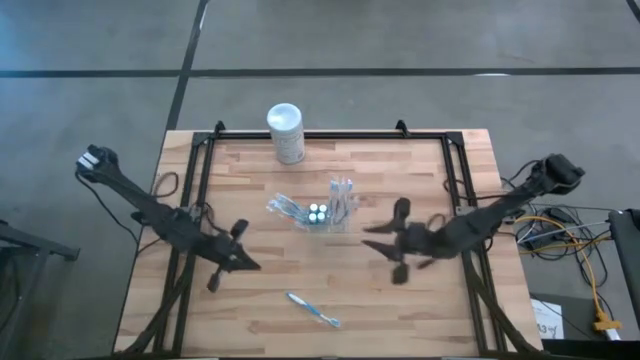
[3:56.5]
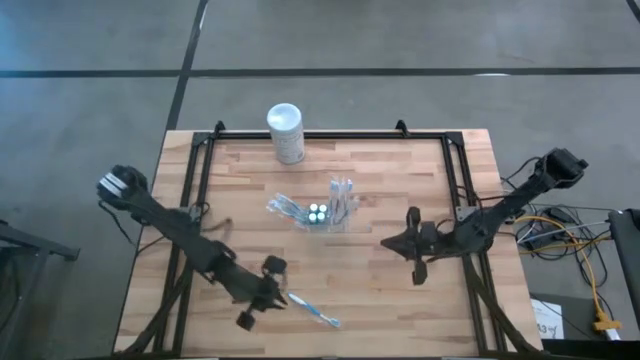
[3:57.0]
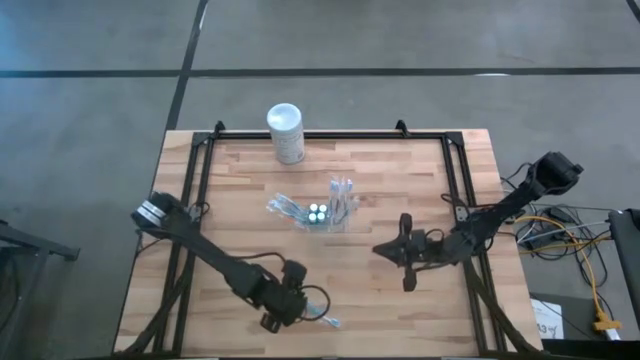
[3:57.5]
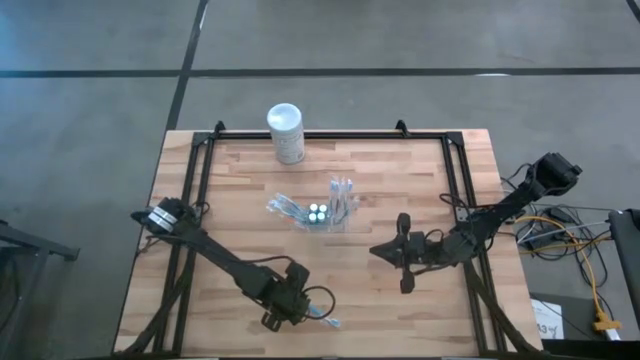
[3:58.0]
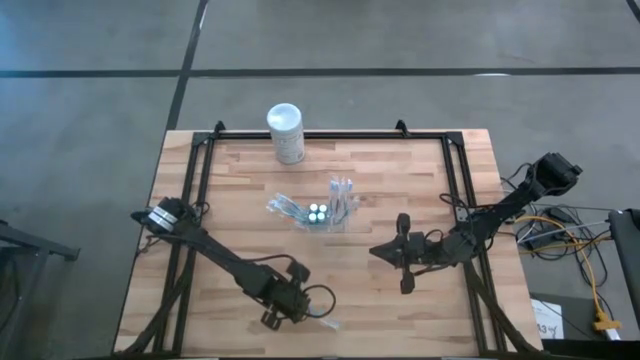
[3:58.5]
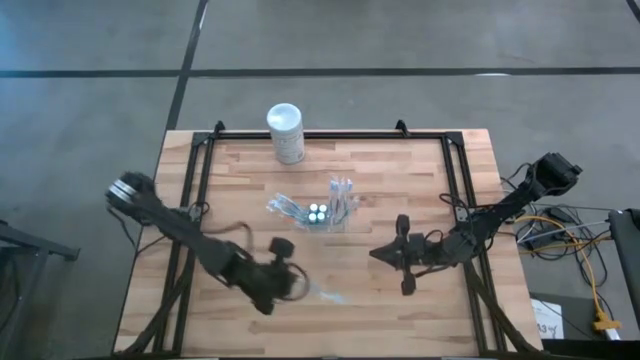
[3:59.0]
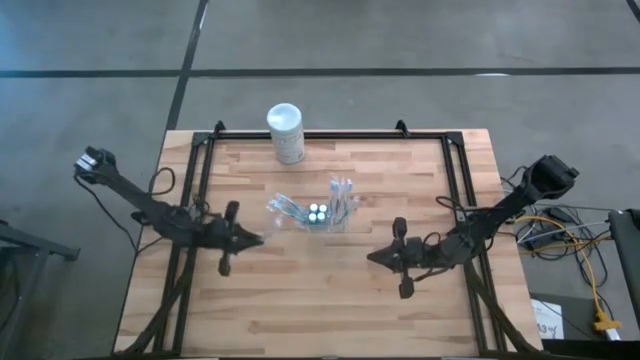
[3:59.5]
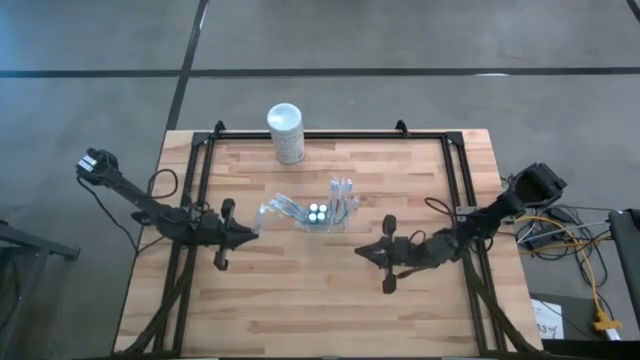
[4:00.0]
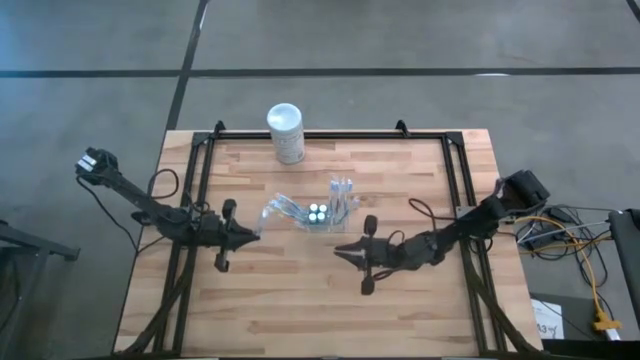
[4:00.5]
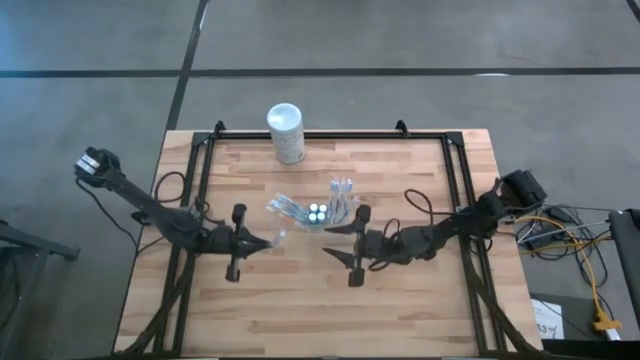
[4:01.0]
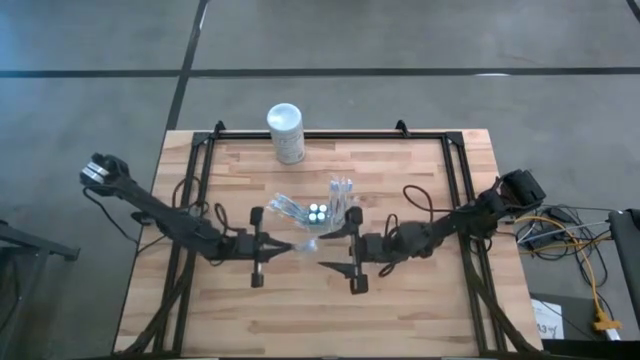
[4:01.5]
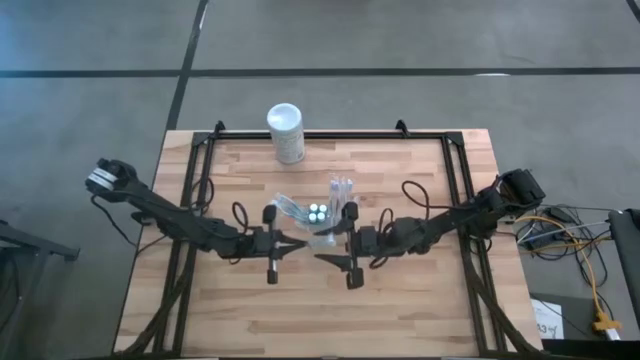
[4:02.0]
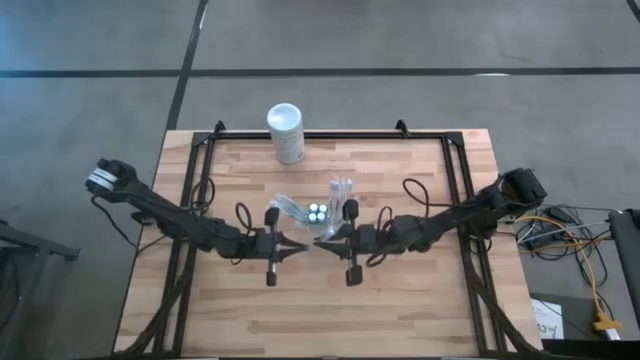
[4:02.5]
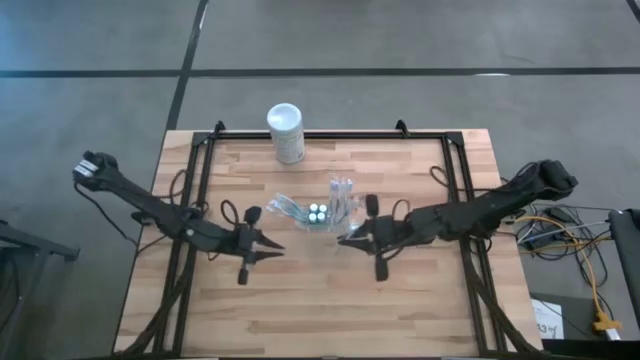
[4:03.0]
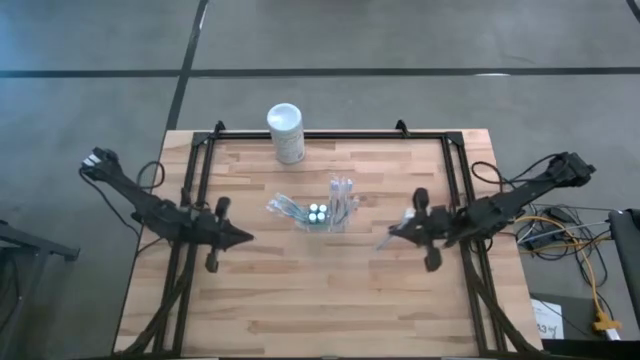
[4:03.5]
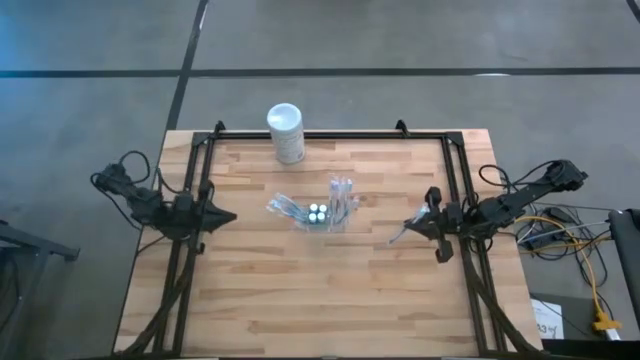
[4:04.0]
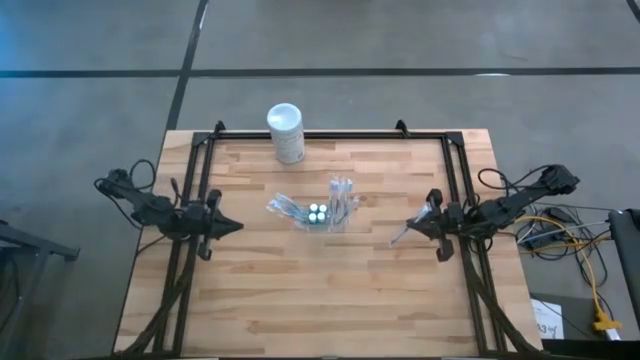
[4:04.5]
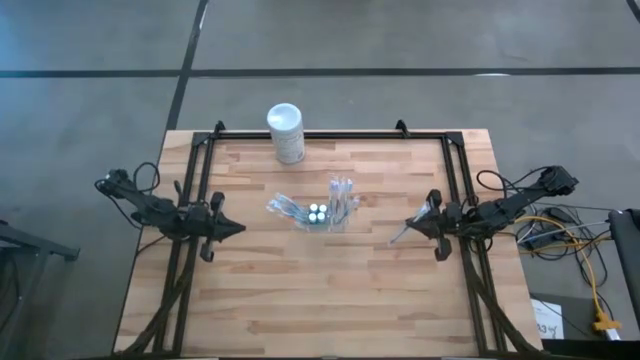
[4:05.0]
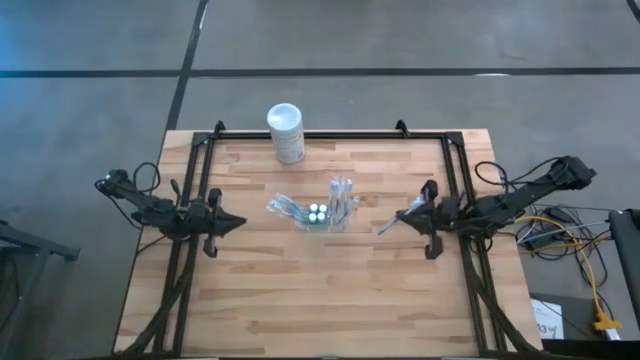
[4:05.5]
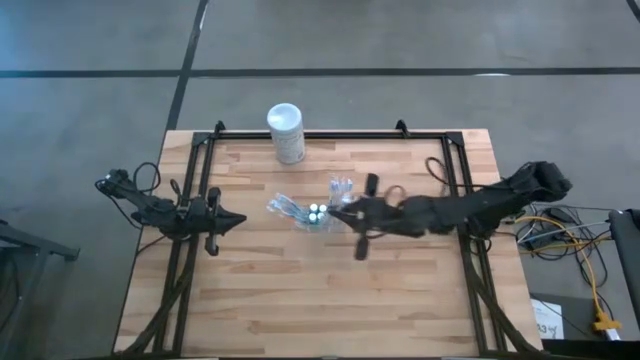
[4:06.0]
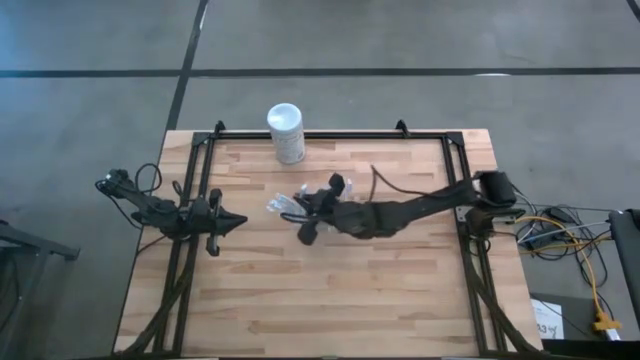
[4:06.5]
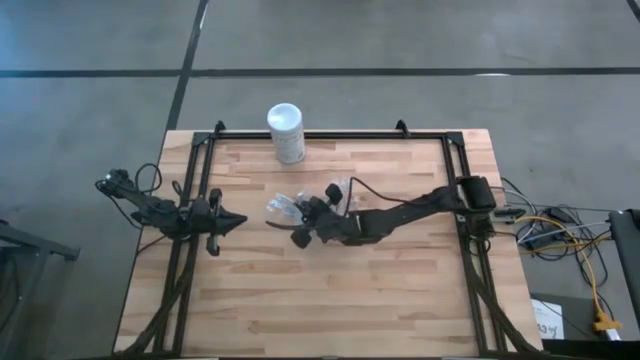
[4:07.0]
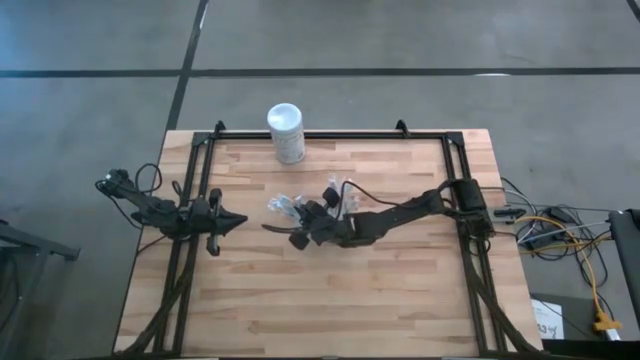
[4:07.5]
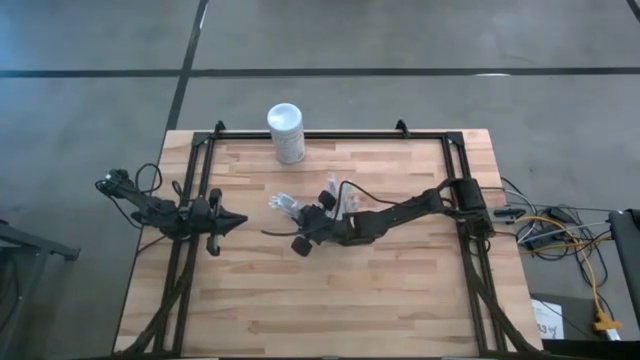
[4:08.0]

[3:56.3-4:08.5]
Task: Pick & Place toothbrushing station
Put the blue toothbrush into the transparent organizer

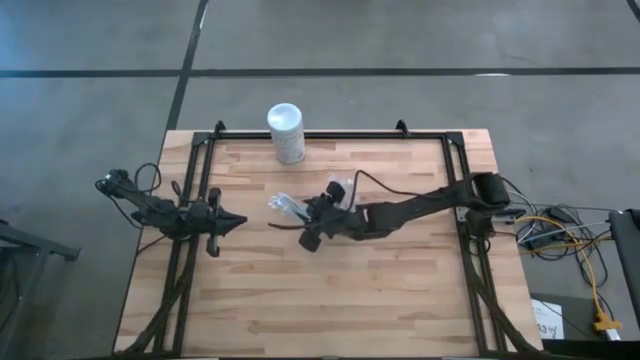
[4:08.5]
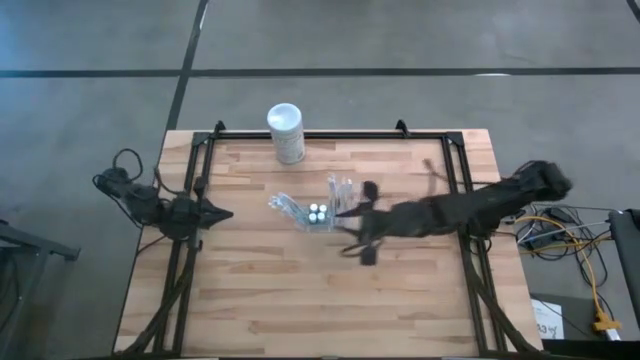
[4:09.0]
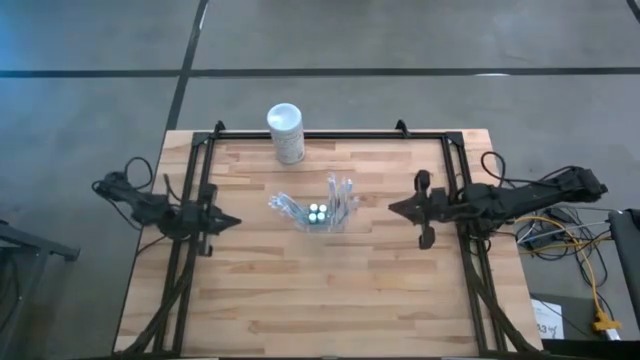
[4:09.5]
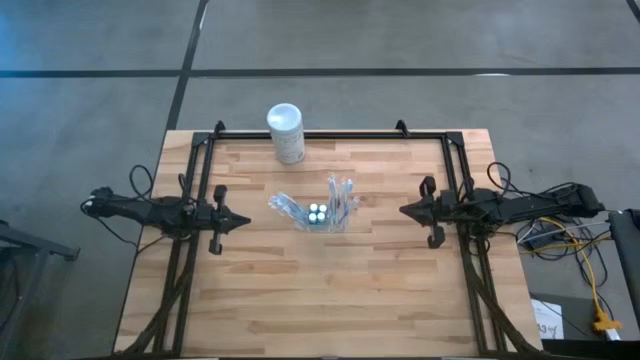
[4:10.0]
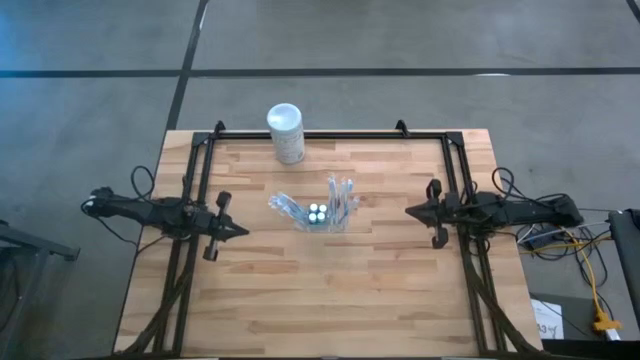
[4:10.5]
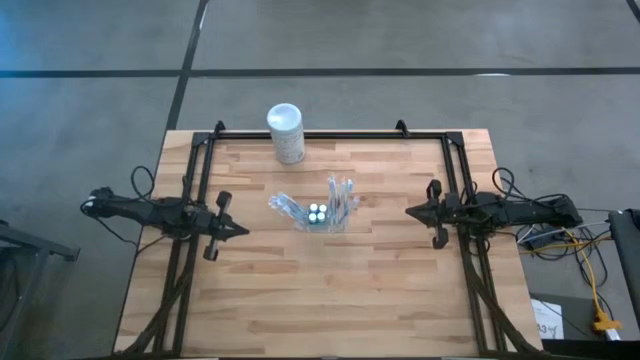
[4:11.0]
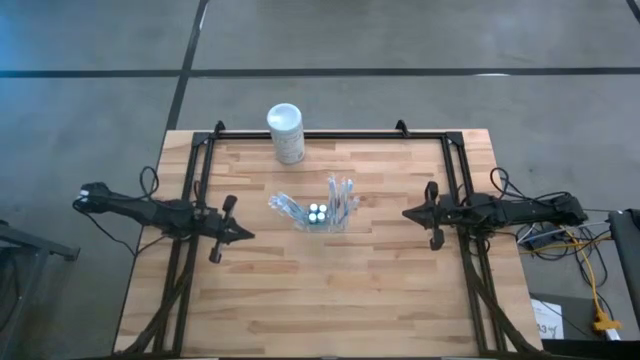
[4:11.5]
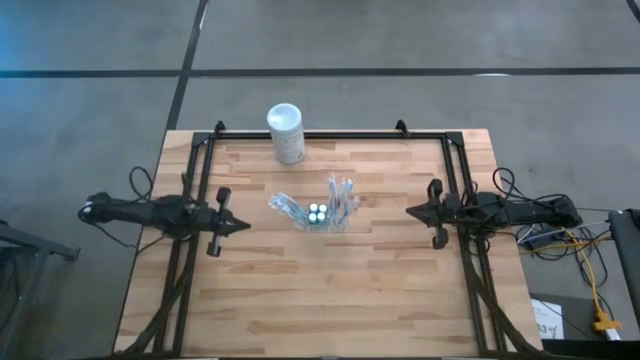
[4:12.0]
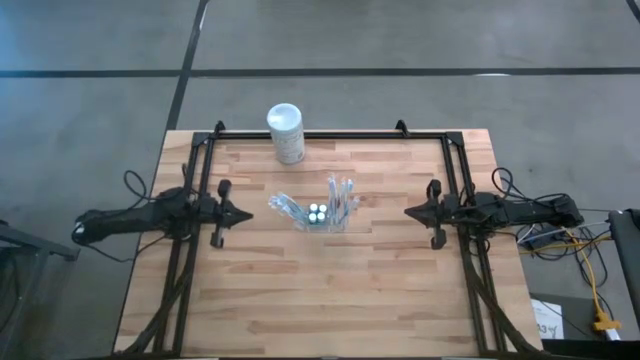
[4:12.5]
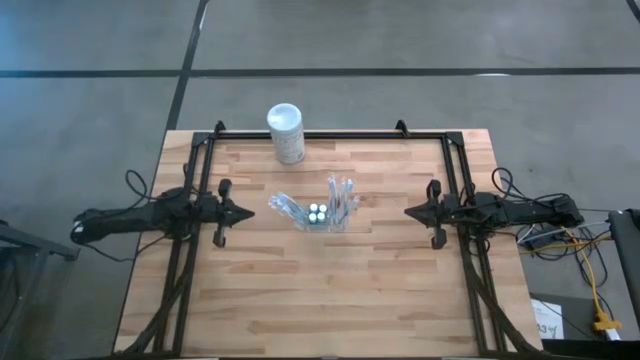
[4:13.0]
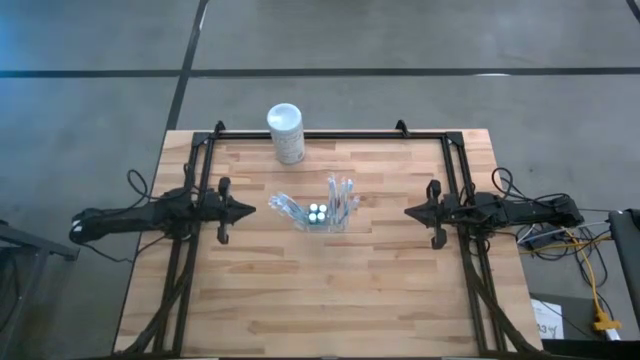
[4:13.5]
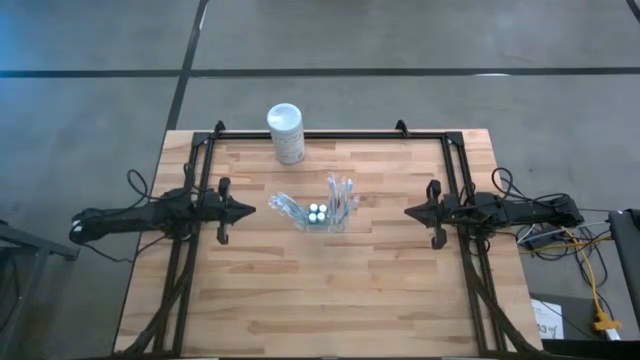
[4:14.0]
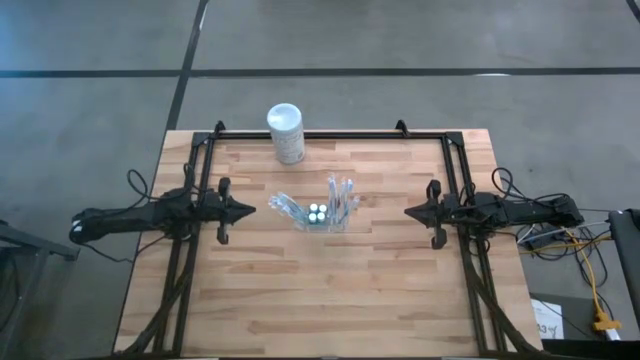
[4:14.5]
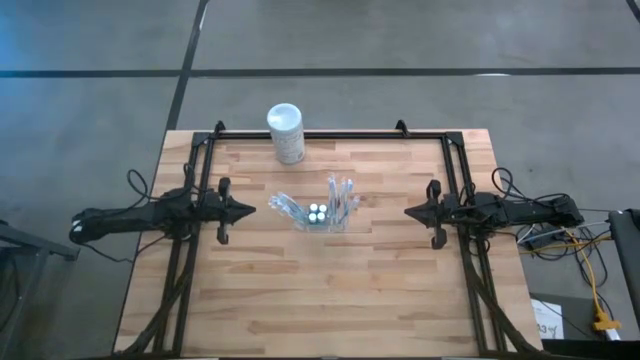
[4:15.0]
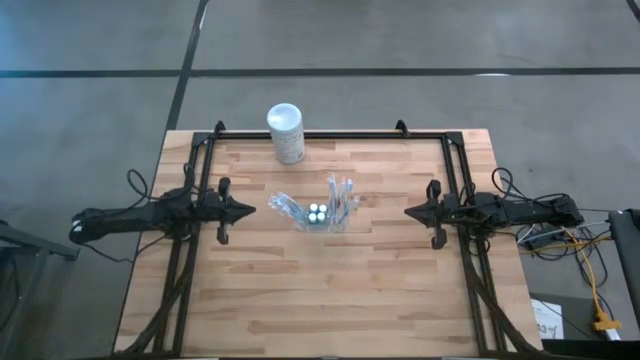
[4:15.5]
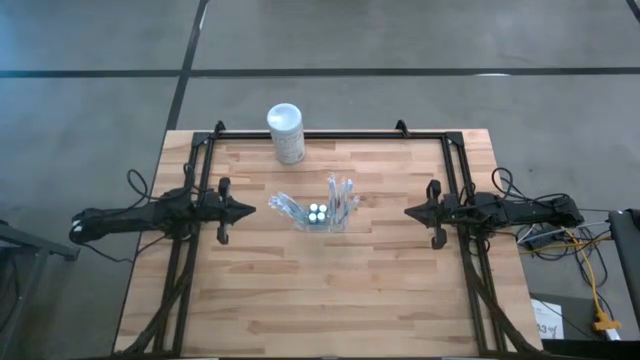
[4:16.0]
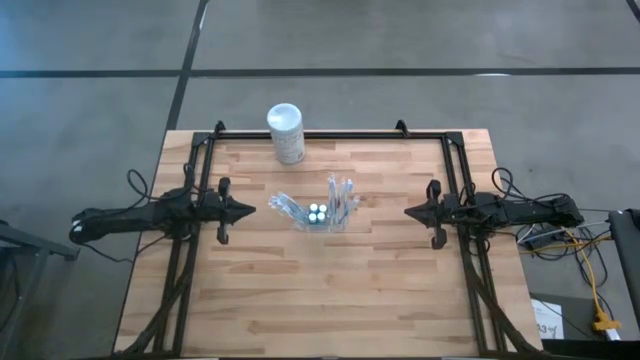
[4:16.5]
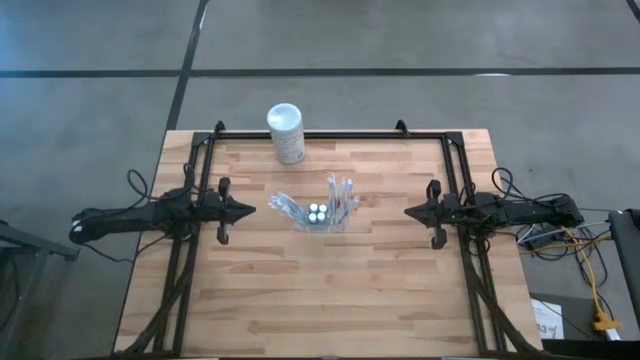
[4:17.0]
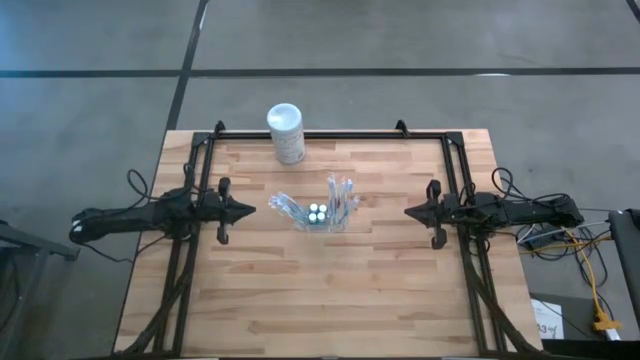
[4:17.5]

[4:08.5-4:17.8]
Return to Home Position
